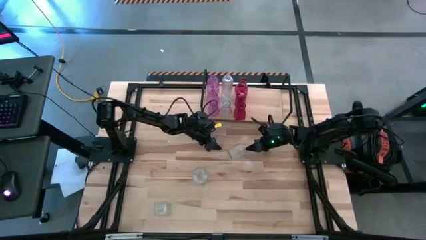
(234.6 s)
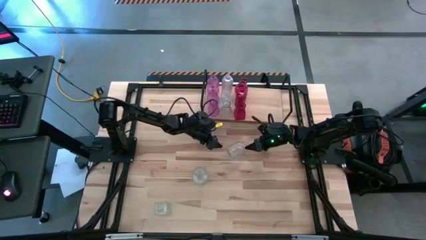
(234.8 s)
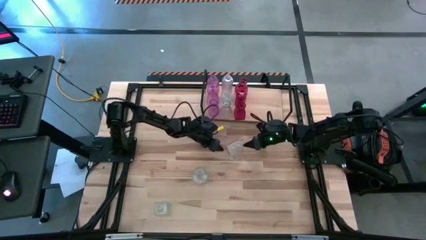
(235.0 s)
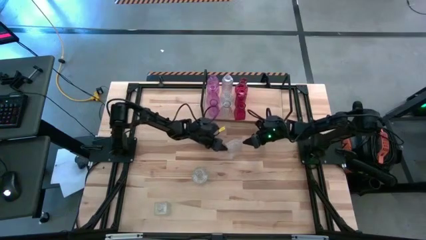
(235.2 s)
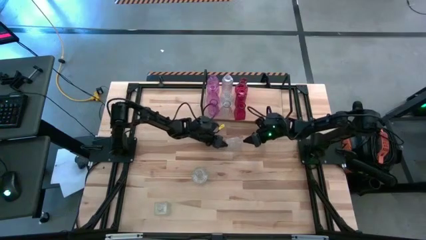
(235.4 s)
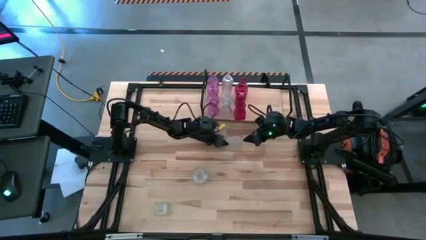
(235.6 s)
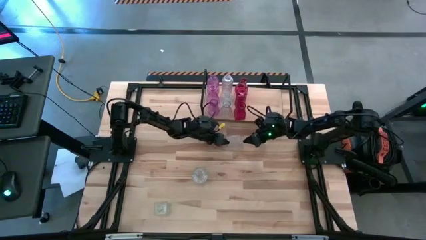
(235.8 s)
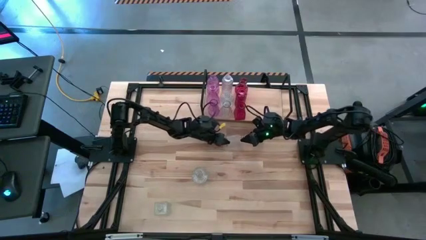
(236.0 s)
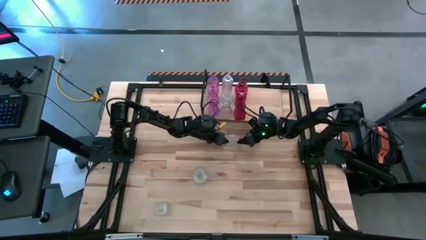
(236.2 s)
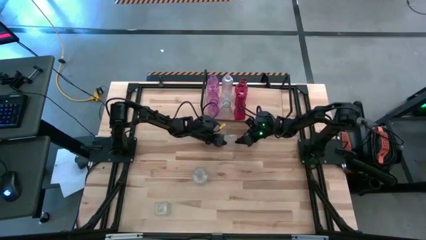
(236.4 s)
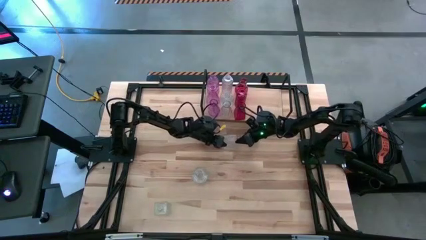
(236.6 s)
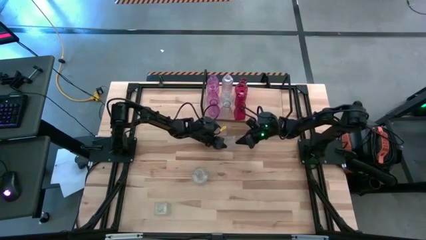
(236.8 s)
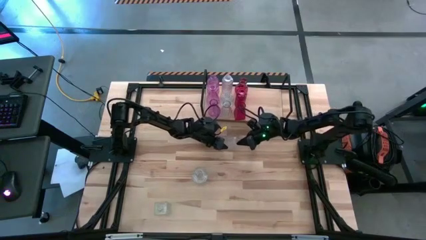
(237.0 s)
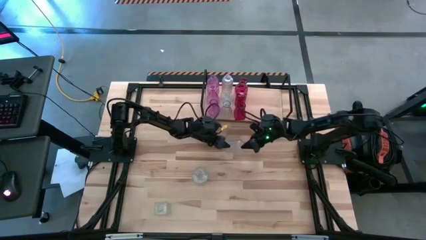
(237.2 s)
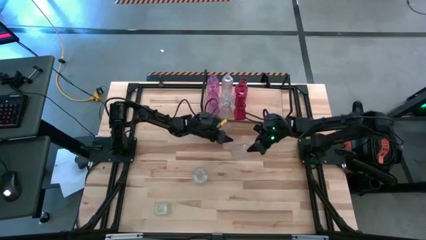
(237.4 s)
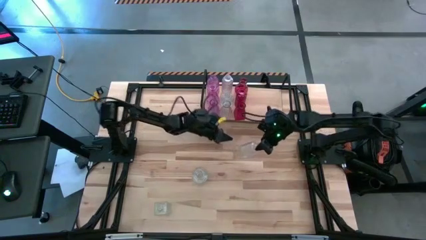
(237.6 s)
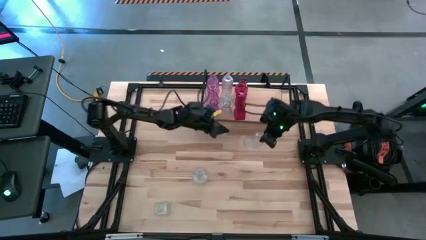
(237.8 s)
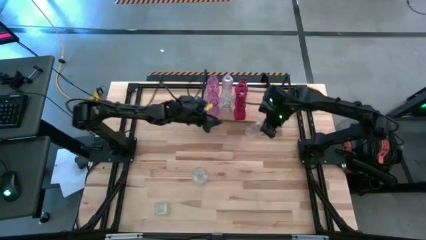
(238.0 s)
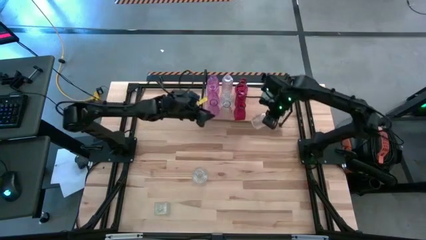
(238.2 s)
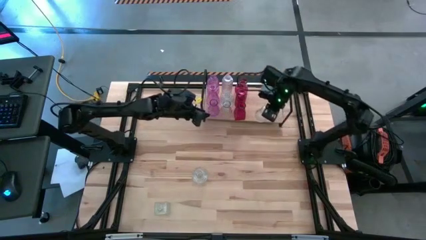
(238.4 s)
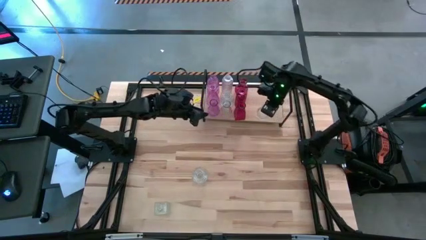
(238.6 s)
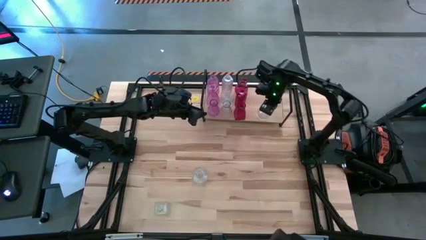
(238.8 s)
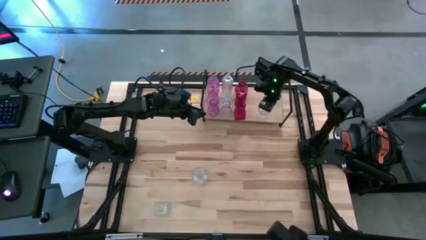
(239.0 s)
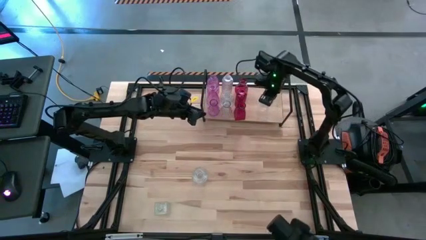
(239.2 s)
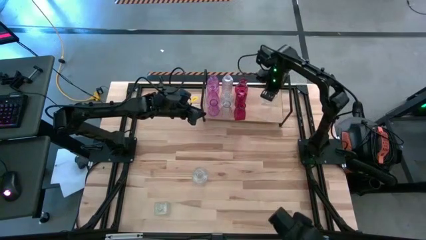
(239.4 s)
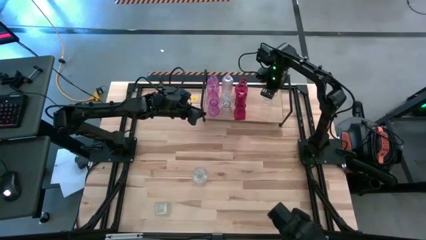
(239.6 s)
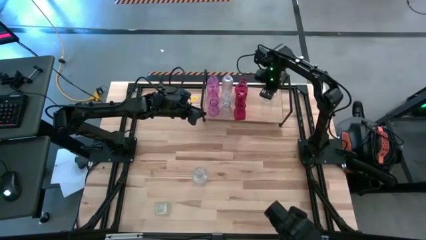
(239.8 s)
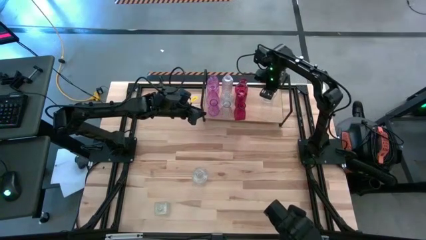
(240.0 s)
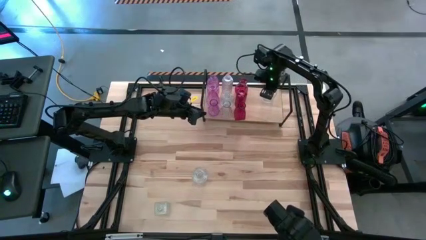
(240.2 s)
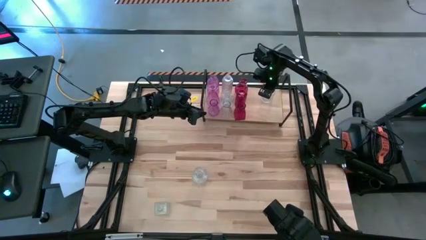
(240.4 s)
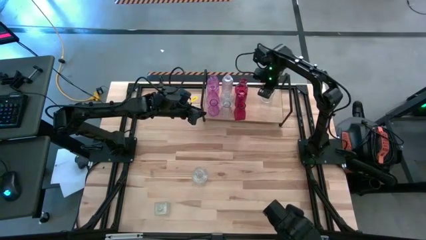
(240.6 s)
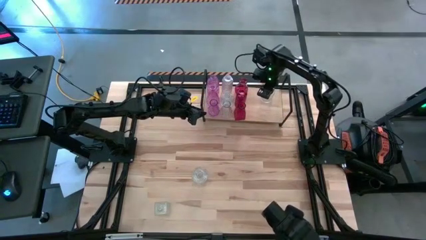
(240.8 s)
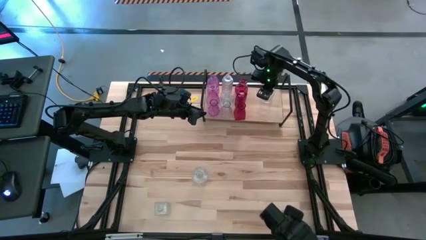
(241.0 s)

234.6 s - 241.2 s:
Task: sort vases onto shelf
Put the transparent vase on the shelf

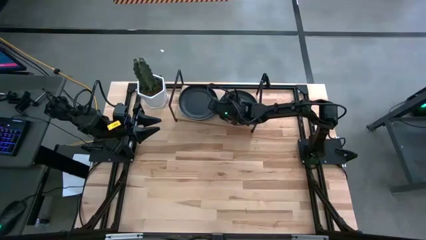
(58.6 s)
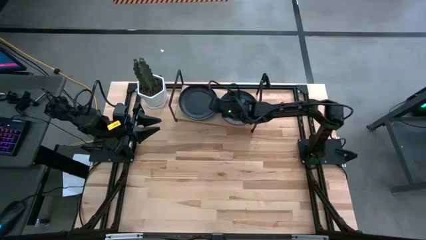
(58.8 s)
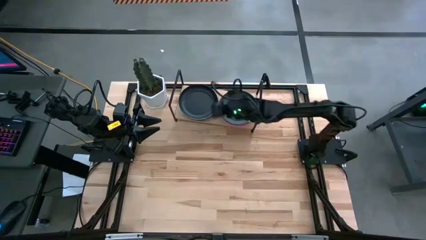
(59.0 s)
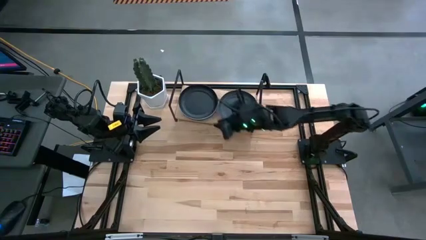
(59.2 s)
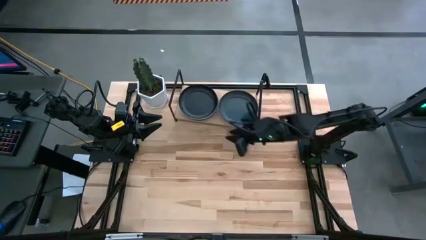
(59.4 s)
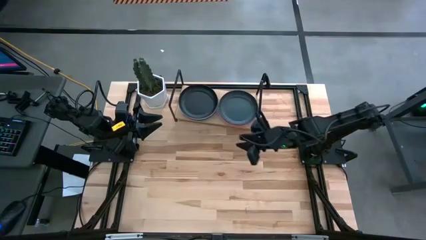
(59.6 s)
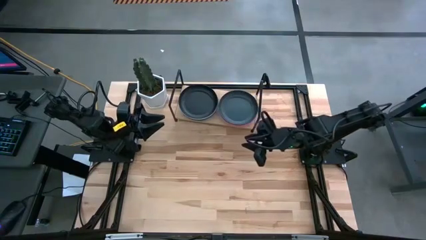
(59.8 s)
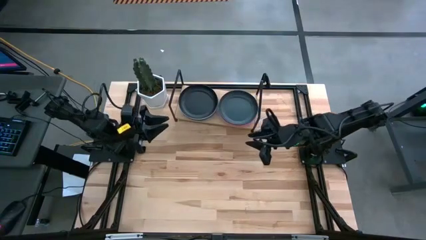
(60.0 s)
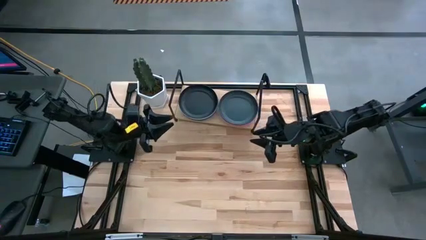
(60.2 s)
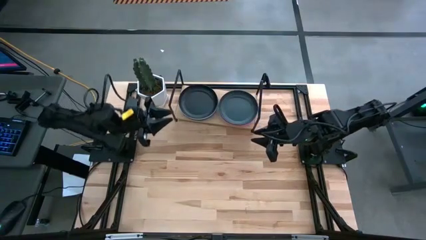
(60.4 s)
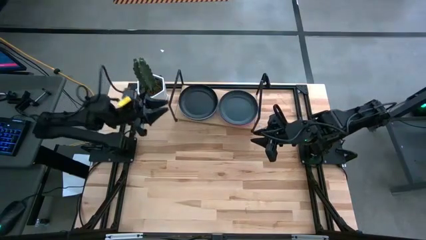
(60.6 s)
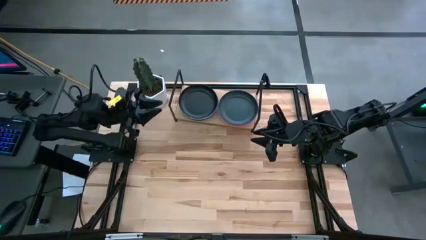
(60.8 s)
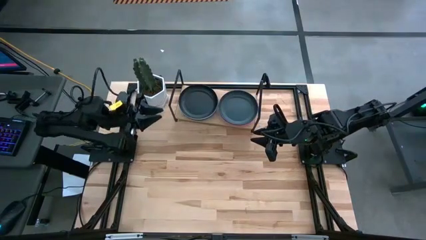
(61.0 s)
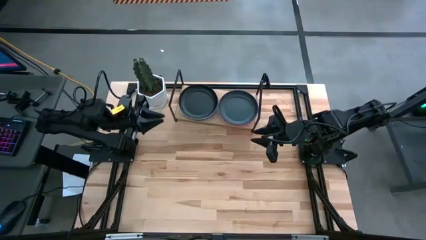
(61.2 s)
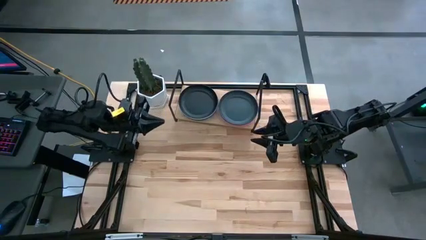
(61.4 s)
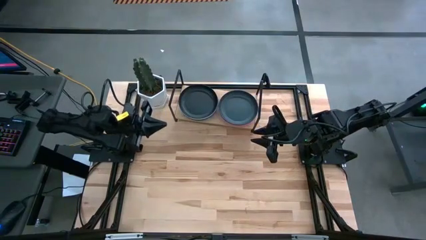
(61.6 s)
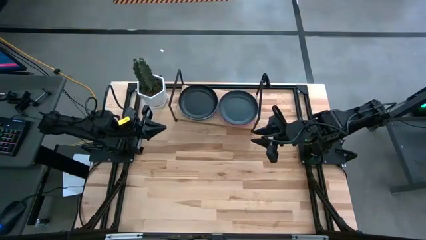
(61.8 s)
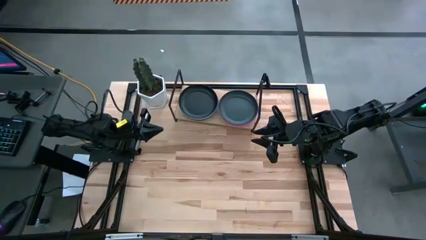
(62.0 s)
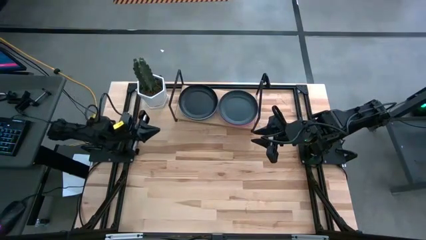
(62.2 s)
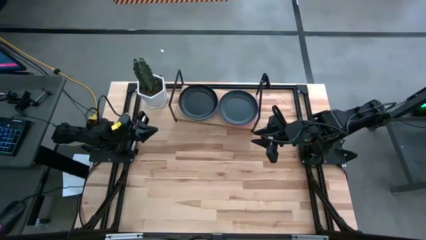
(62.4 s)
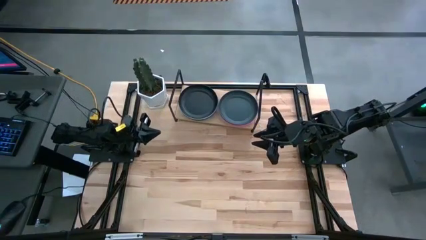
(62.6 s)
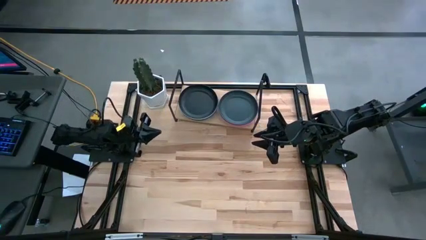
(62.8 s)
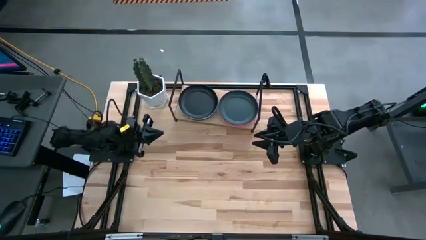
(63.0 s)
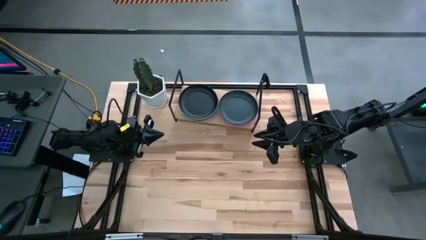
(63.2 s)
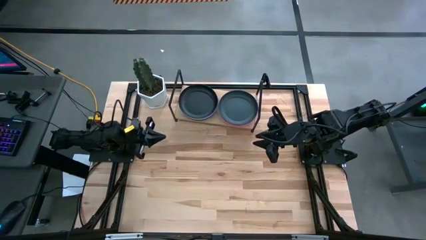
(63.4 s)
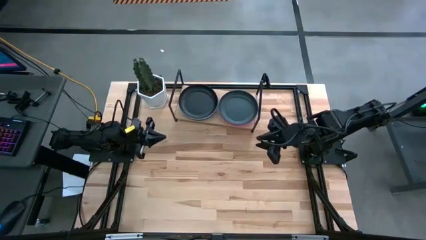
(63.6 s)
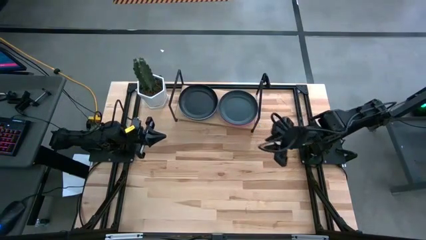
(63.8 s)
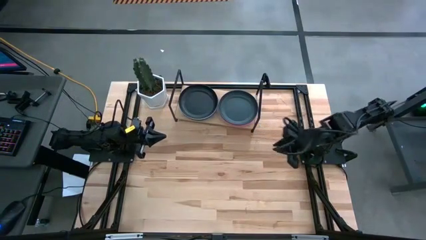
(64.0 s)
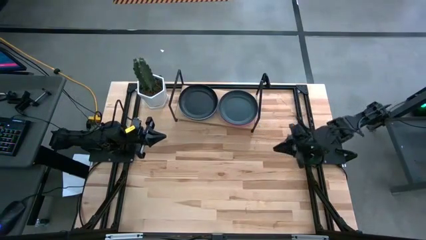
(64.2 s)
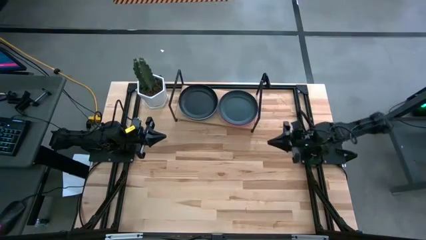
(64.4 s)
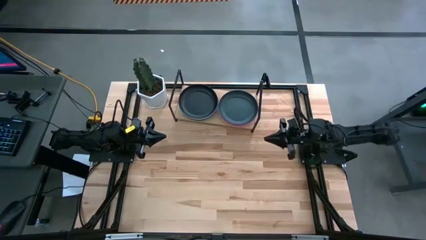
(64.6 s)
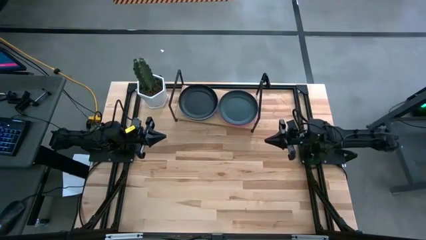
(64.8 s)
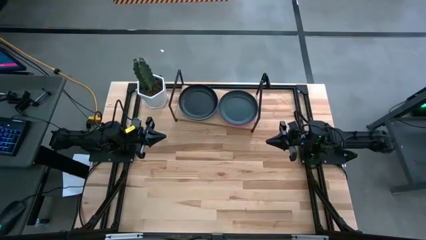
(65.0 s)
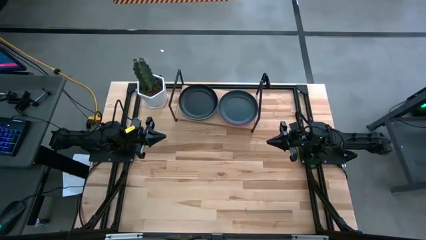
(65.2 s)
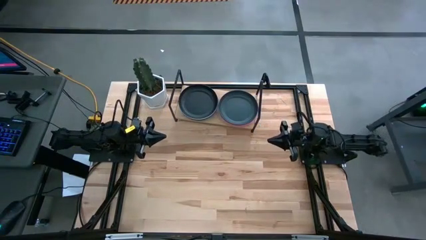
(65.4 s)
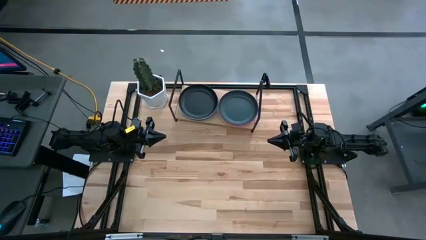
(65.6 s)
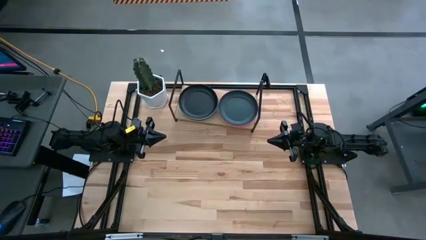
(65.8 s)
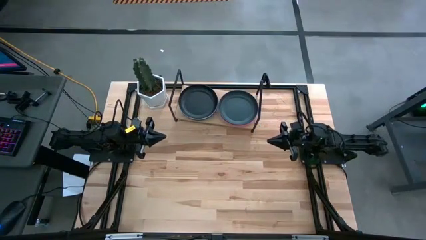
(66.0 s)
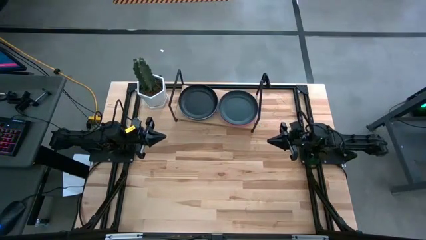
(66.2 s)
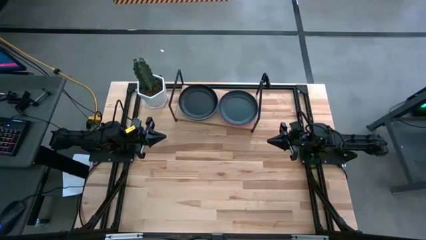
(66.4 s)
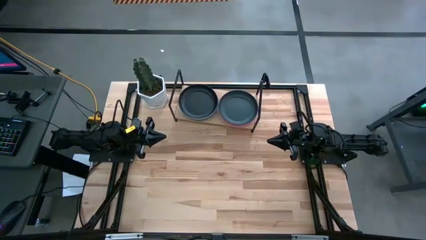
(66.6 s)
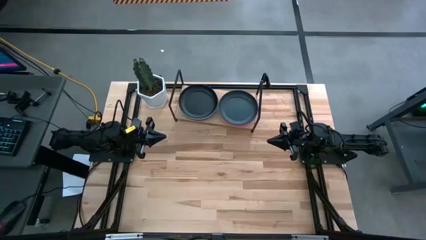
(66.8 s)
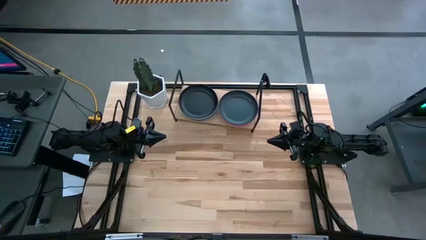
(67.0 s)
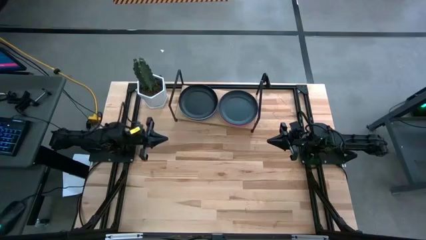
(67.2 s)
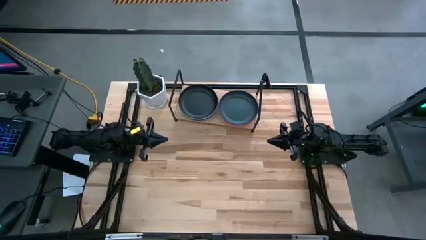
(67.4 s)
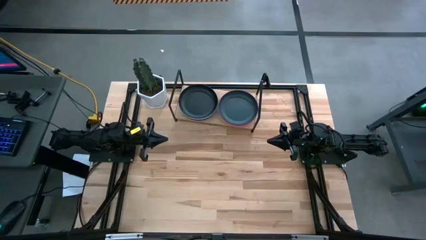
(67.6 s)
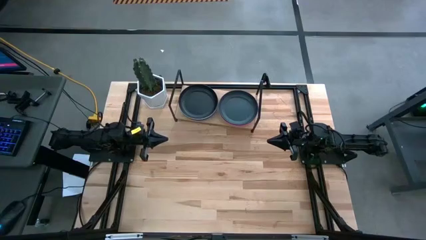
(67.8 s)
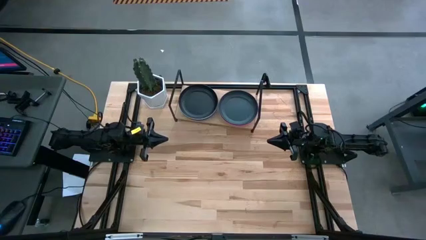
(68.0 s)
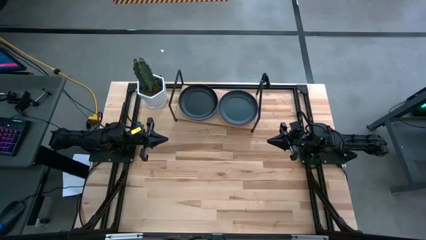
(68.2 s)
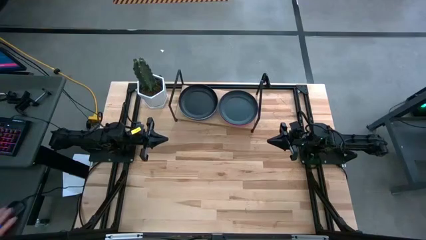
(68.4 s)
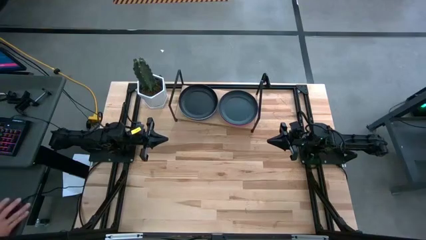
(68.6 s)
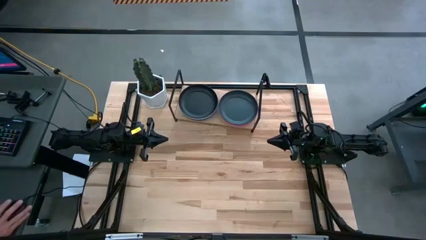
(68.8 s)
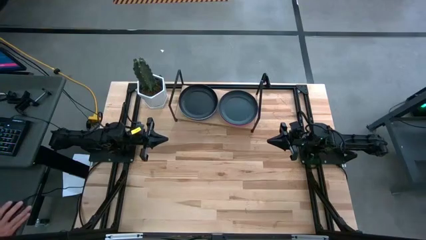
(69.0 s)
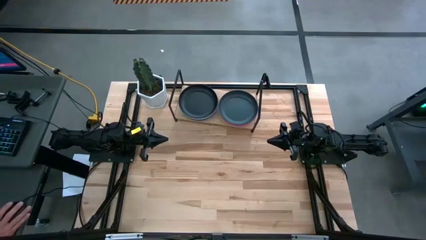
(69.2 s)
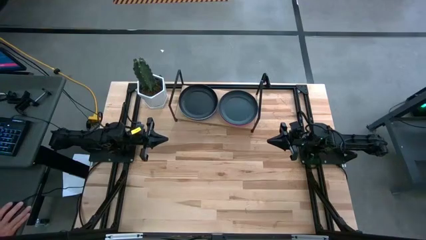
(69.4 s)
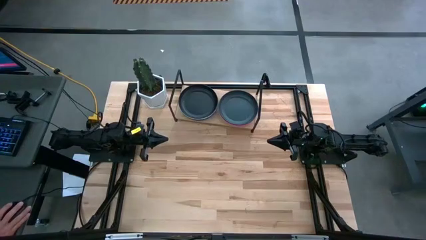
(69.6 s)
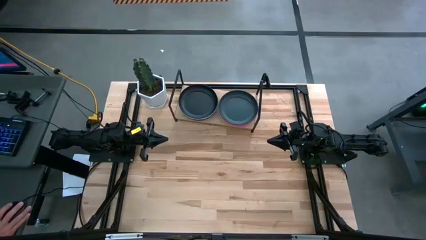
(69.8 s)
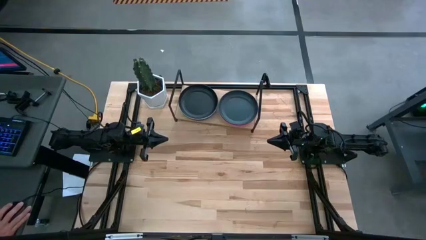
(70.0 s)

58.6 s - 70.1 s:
Task: Place and stack plates onto a shelf
Return to Home Position
